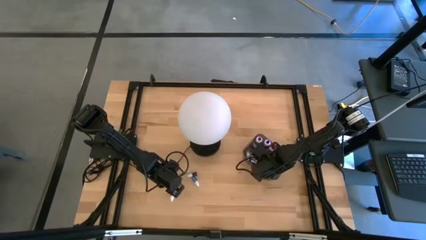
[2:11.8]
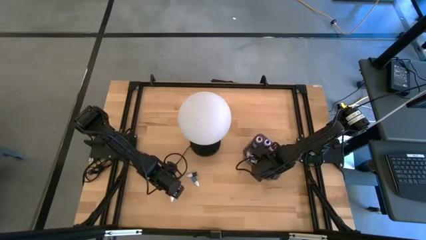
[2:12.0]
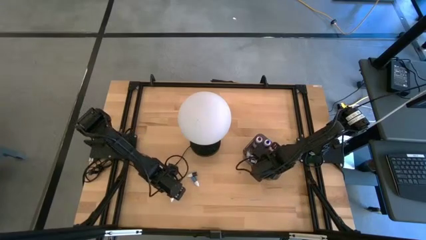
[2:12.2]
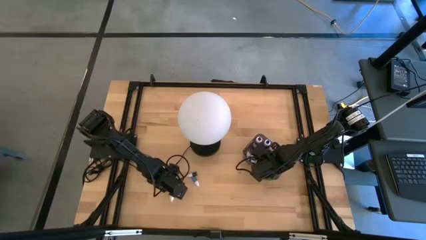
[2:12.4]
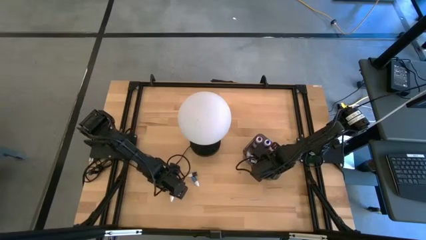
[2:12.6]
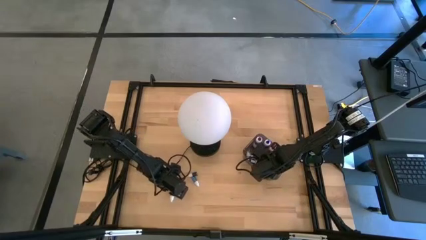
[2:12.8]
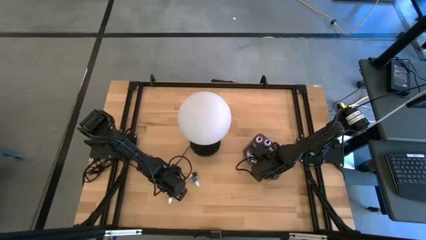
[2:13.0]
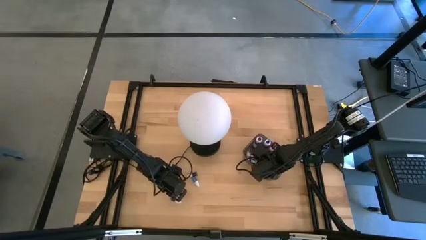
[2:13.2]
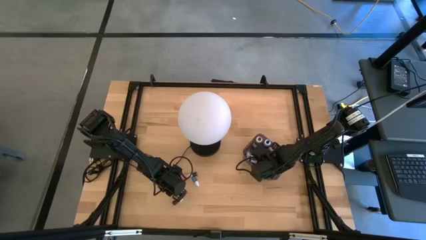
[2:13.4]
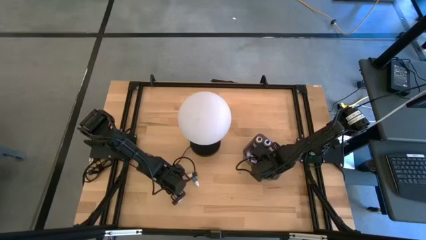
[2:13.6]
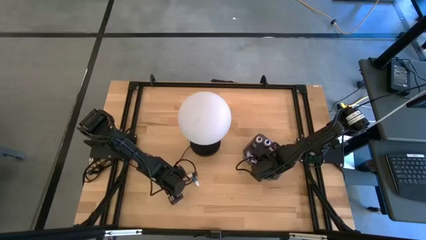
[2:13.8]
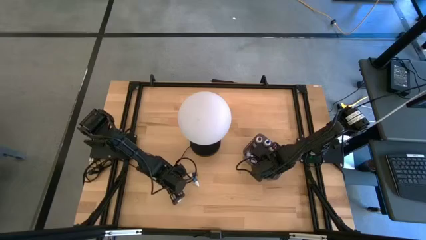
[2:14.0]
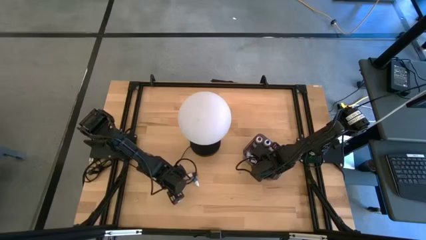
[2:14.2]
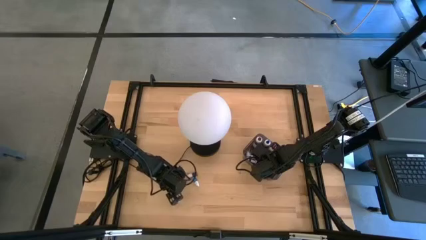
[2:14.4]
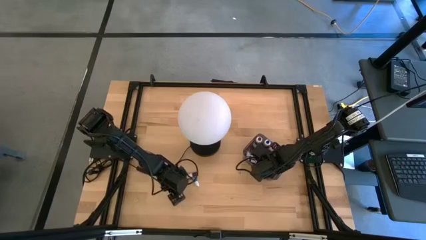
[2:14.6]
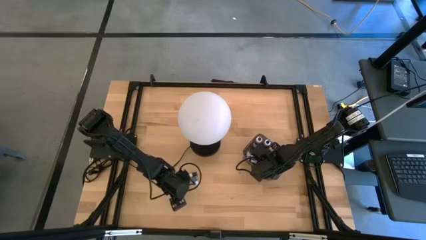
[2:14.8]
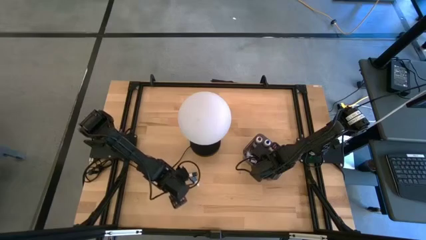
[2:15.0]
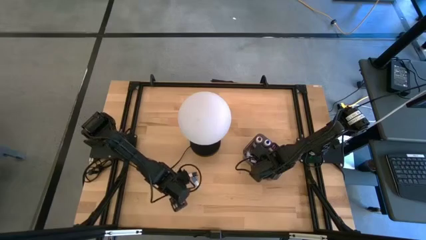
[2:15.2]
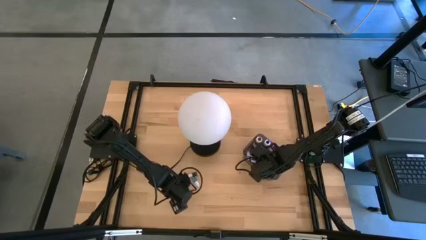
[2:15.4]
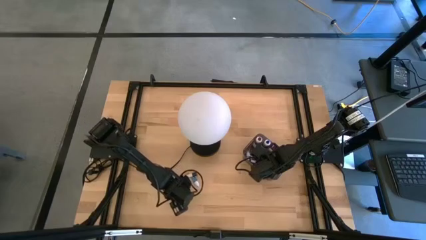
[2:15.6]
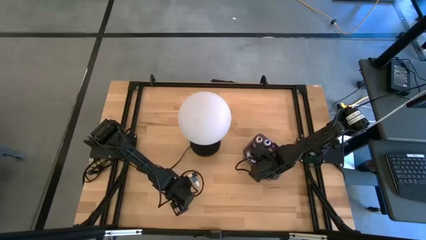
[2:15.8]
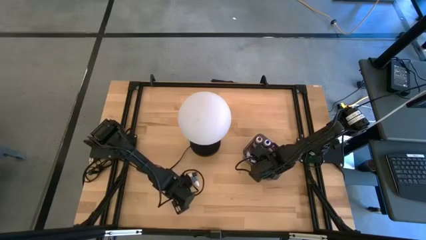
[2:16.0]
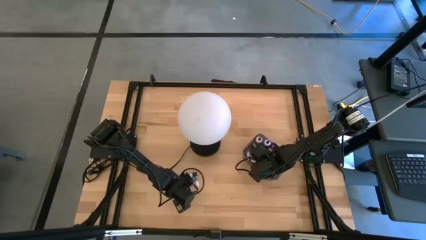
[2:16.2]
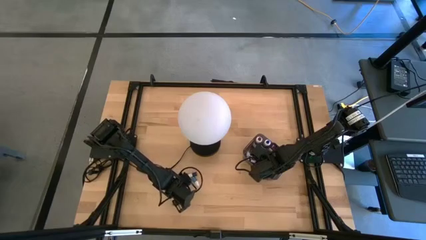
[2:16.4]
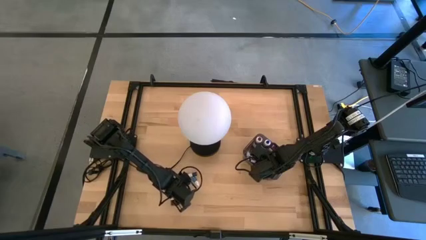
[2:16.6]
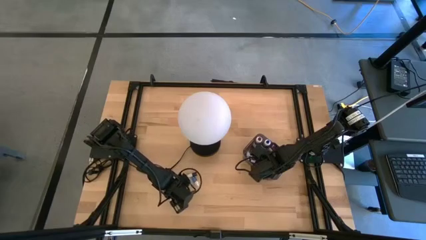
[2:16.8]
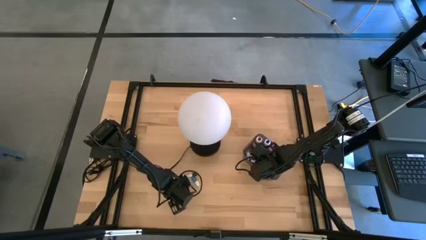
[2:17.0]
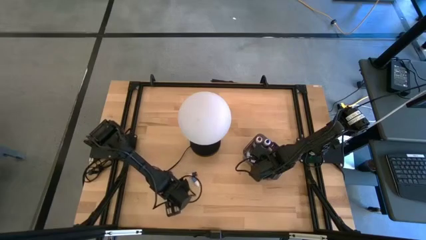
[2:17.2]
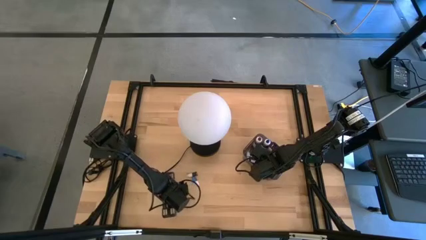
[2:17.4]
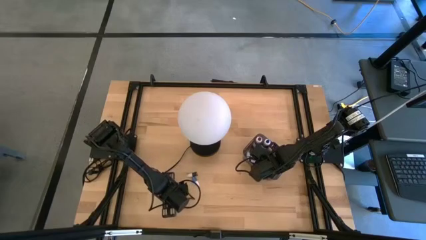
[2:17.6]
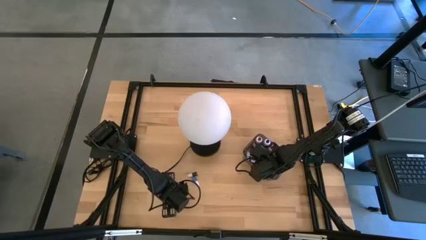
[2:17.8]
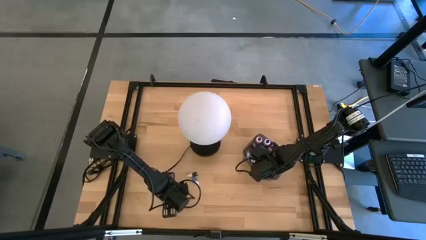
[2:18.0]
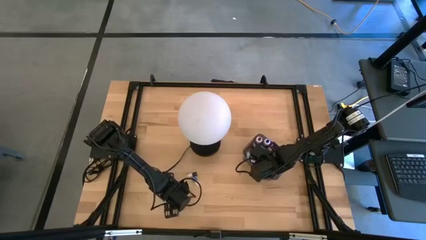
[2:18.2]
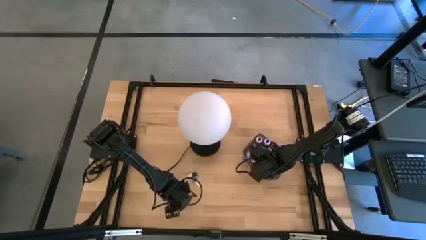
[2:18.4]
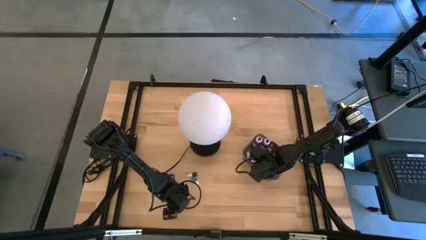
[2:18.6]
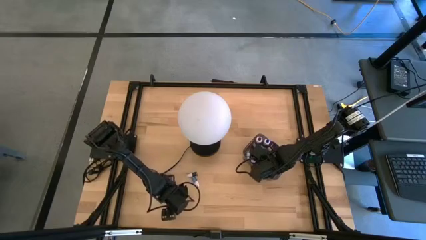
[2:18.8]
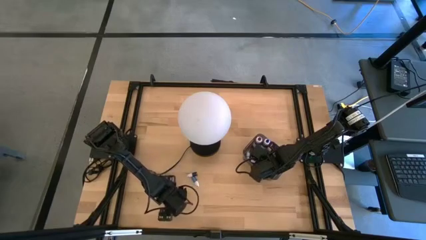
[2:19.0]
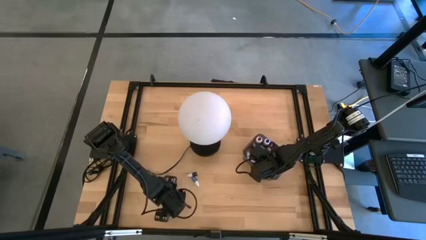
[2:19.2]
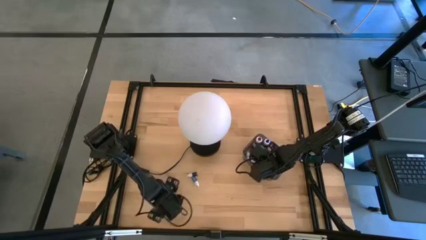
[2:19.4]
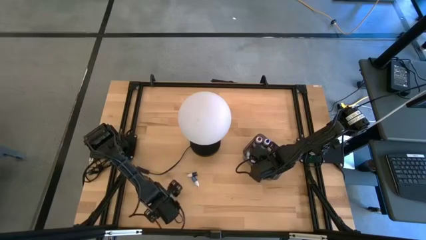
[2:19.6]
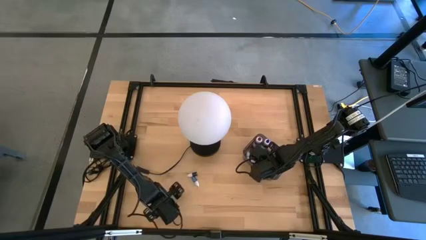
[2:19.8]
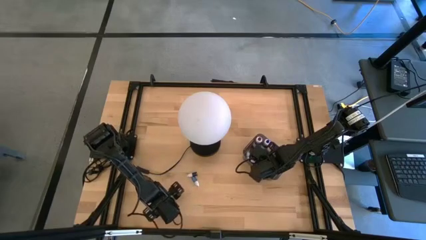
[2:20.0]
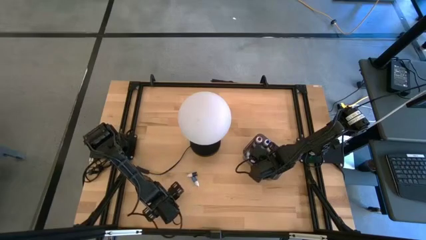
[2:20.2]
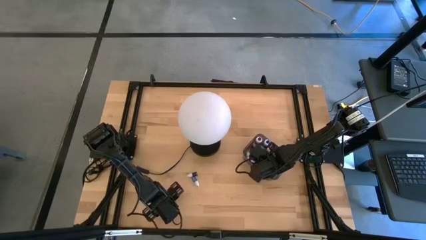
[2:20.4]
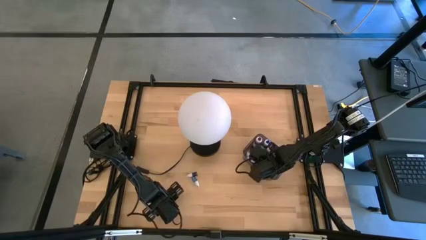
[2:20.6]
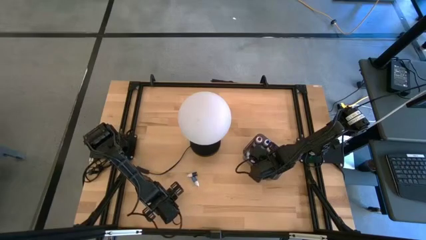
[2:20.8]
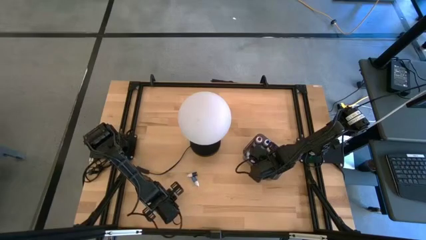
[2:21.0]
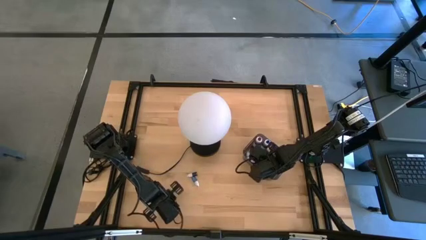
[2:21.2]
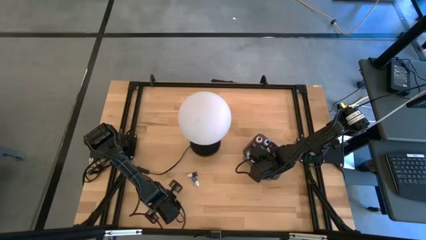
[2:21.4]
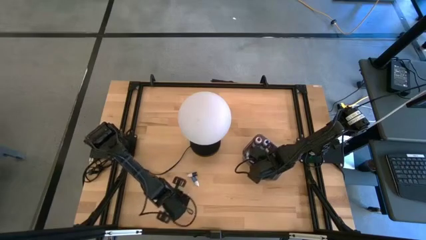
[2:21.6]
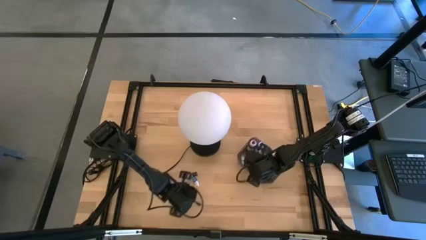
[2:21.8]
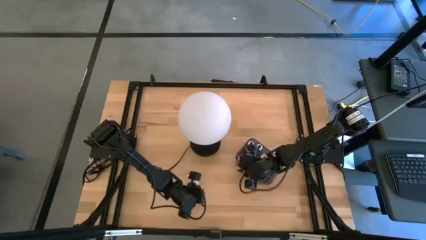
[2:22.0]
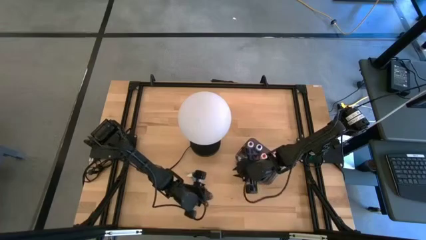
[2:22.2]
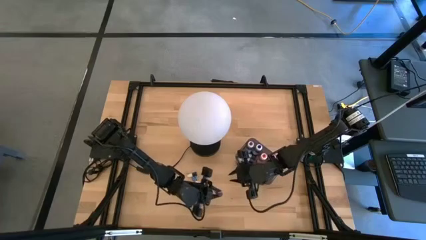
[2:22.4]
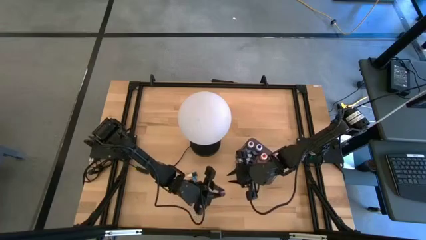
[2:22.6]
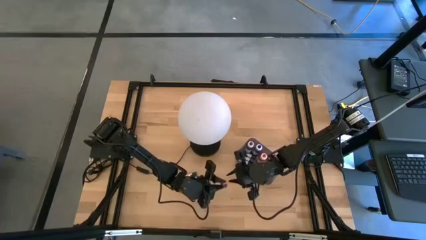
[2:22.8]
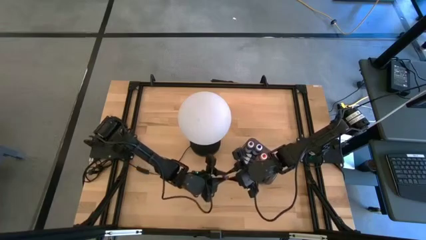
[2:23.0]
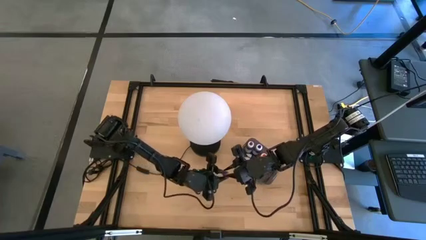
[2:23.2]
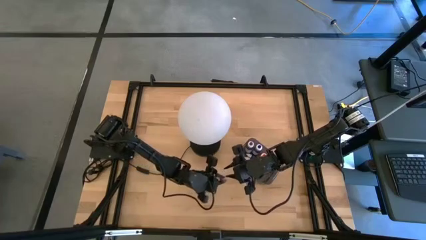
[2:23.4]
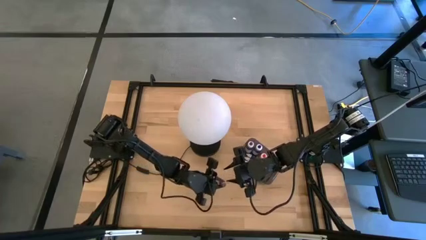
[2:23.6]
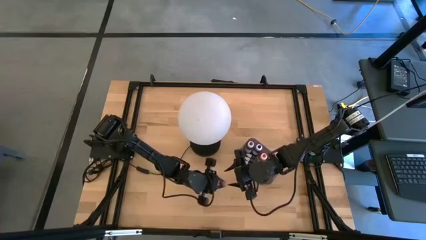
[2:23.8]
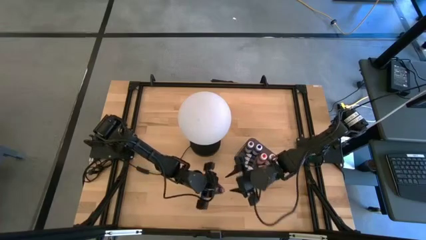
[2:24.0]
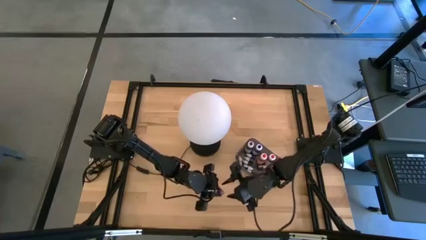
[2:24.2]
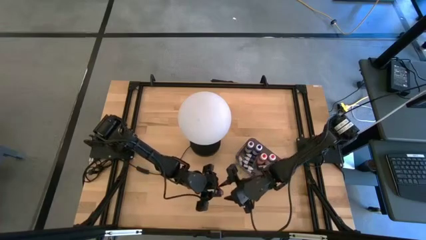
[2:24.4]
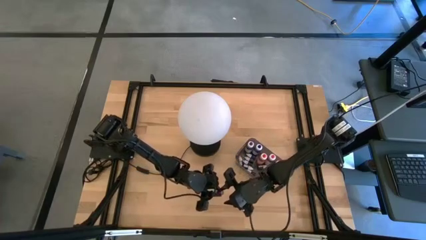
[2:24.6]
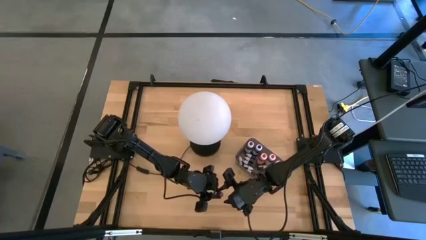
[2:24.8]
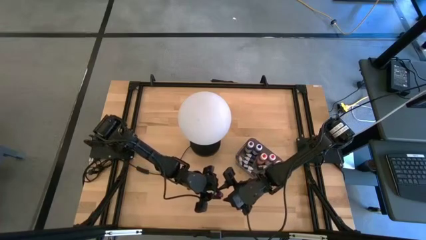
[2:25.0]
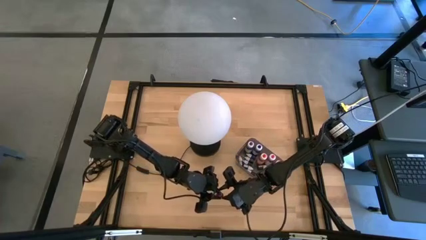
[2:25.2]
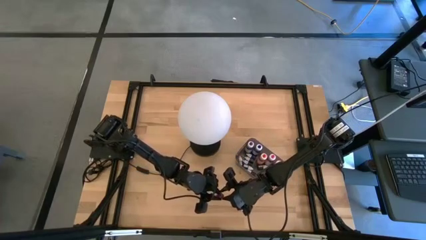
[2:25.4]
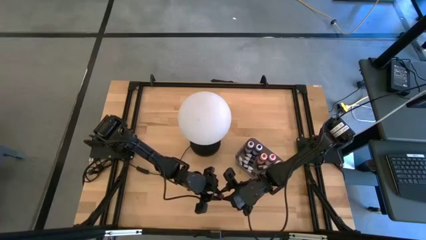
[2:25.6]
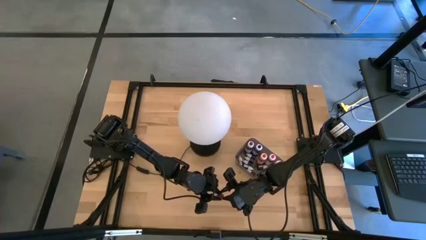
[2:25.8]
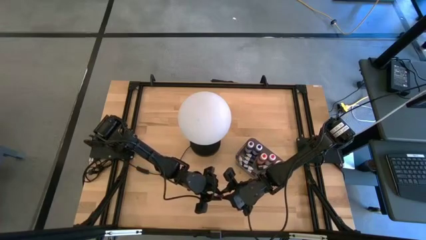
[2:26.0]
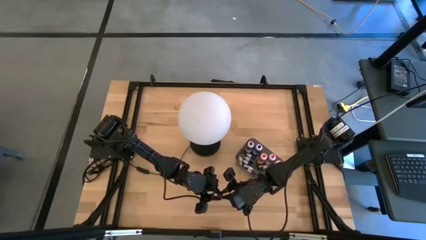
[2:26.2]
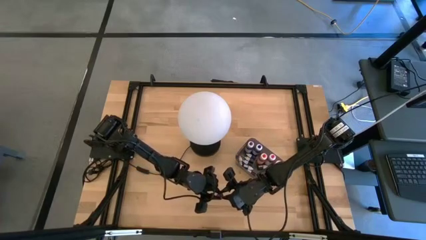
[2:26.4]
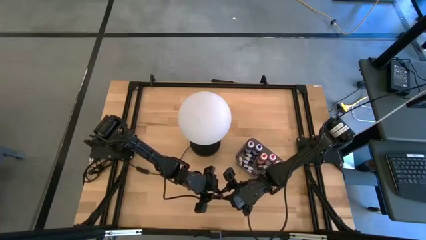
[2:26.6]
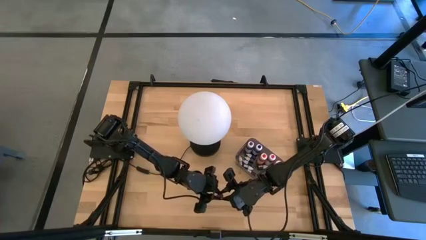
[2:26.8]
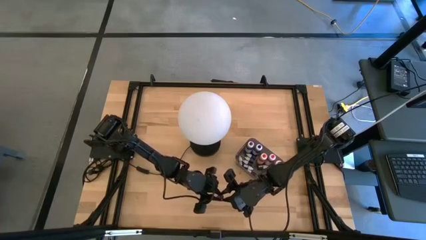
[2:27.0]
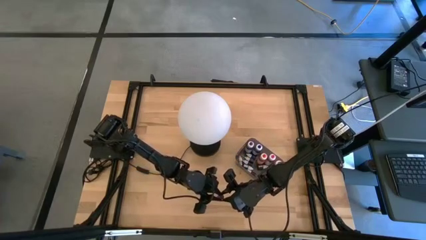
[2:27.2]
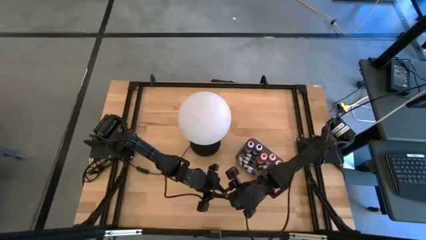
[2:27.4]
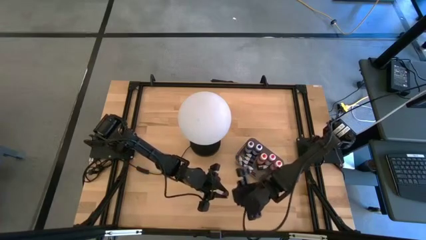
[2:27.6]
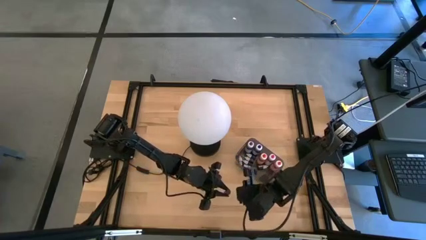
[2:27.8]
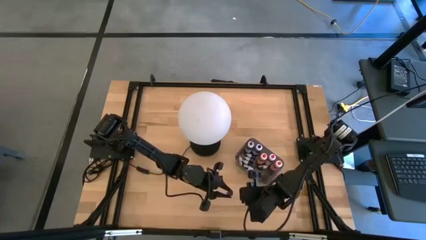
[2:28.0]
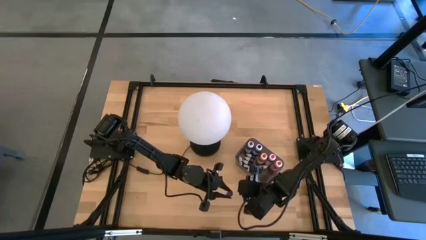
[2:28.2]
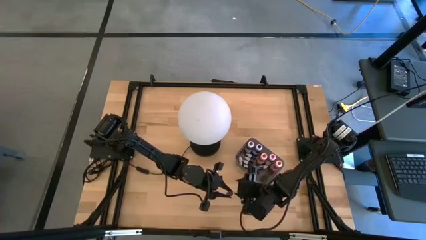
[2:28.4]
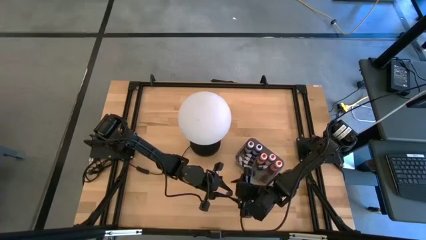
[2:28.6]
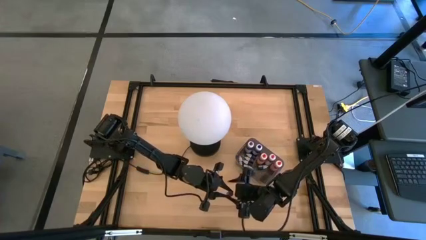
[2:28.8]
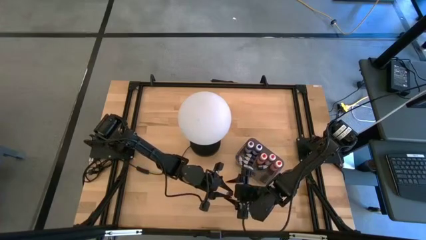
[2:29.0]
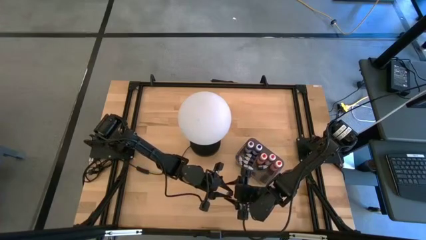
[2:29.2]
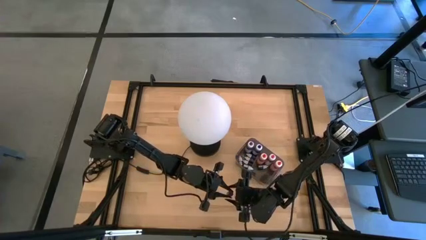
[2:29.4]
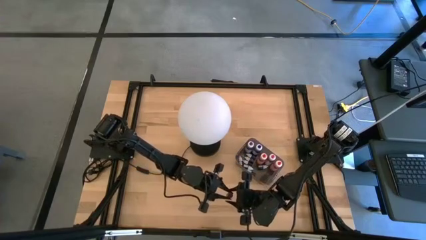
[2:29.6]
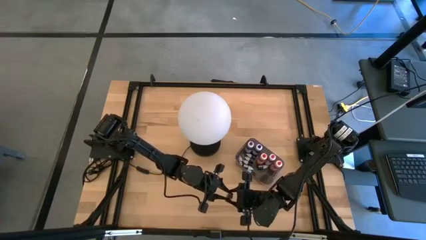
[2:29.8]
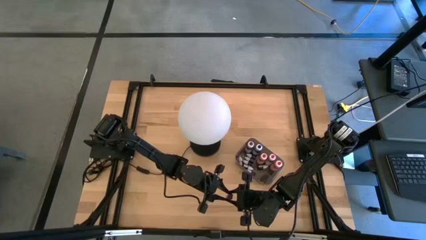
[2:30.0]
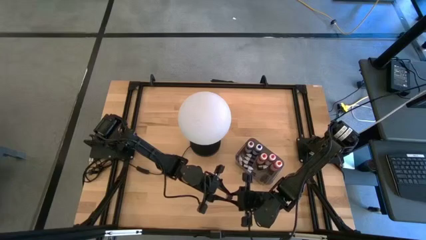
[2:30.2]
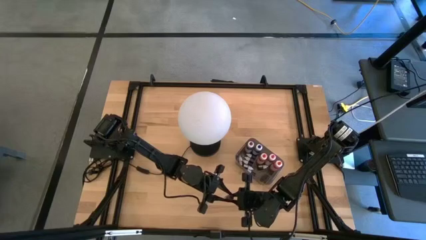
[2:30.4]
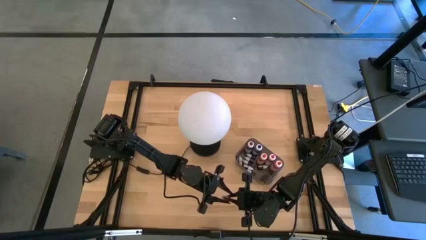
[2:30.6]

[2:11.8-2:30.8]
Task: Pick & Place food coloring
Put the small pink food coloring bottle into the black container
